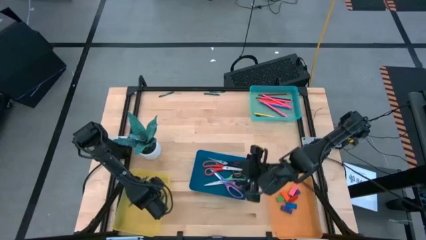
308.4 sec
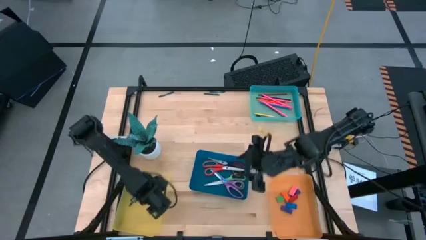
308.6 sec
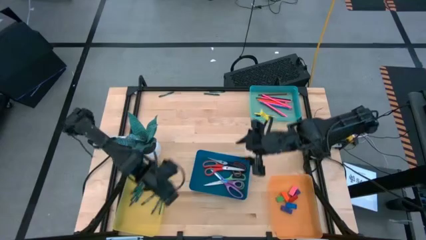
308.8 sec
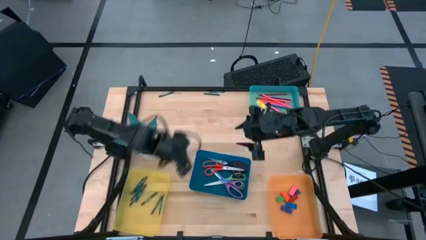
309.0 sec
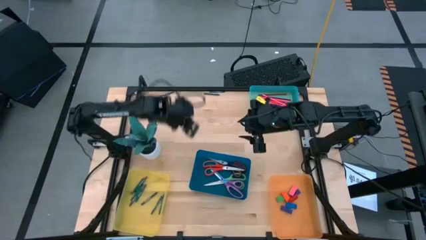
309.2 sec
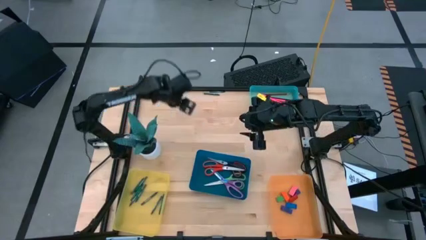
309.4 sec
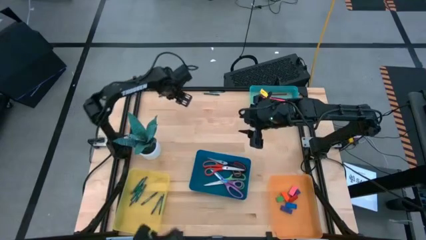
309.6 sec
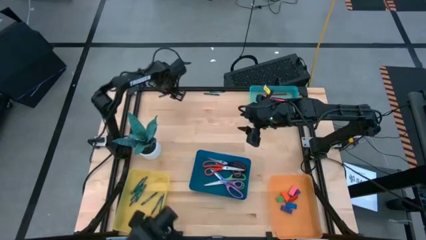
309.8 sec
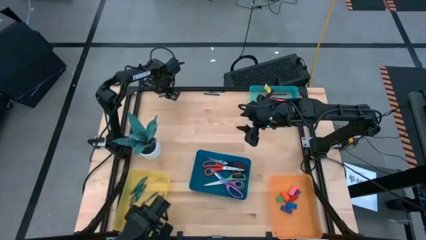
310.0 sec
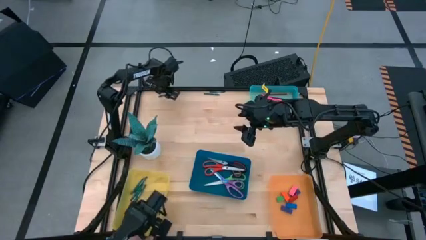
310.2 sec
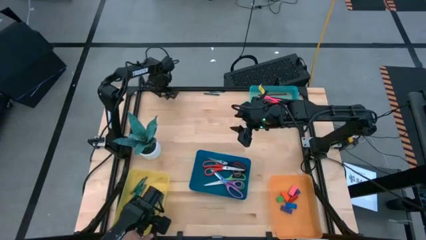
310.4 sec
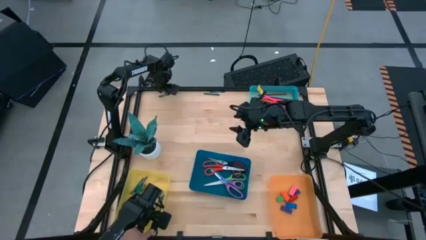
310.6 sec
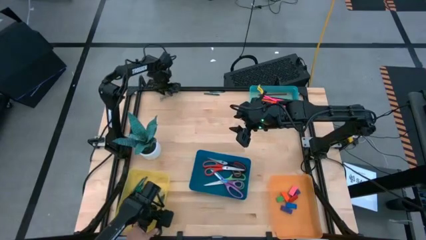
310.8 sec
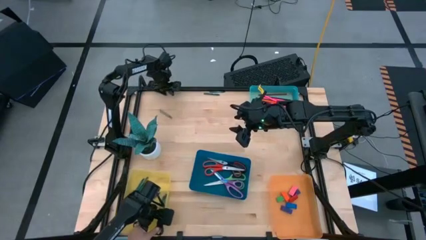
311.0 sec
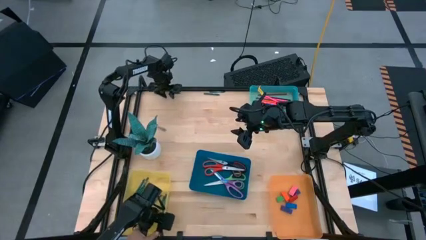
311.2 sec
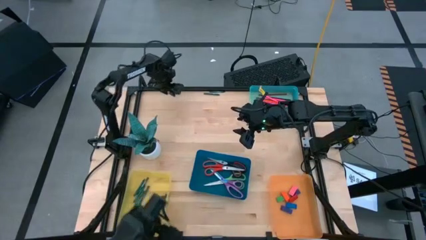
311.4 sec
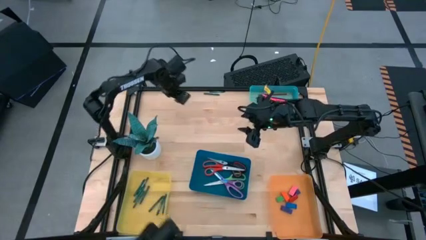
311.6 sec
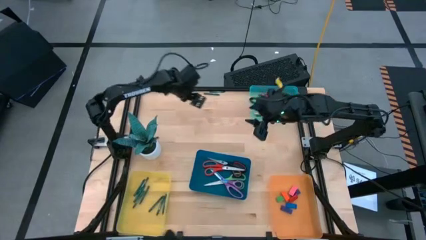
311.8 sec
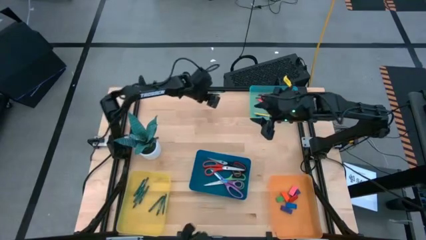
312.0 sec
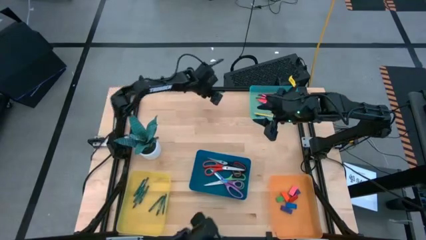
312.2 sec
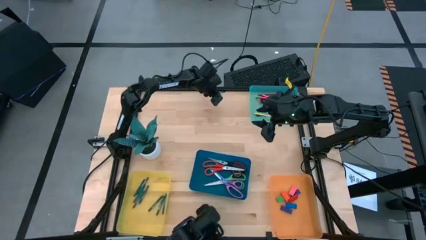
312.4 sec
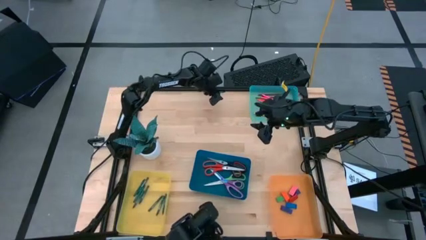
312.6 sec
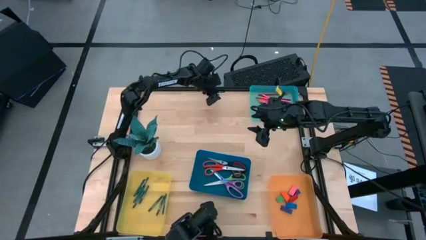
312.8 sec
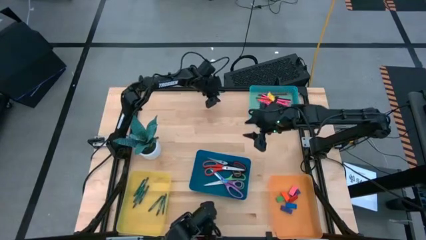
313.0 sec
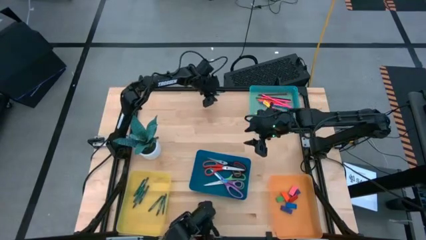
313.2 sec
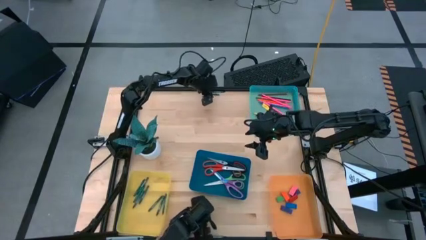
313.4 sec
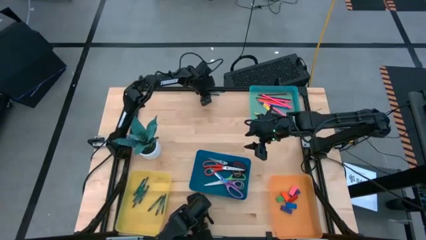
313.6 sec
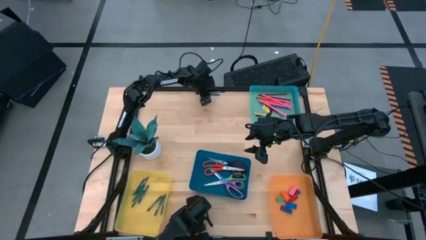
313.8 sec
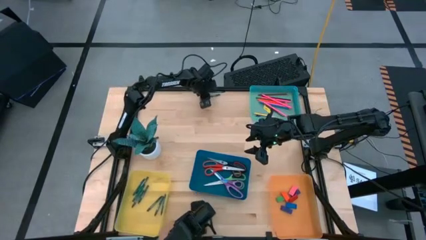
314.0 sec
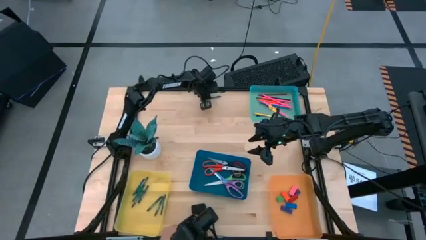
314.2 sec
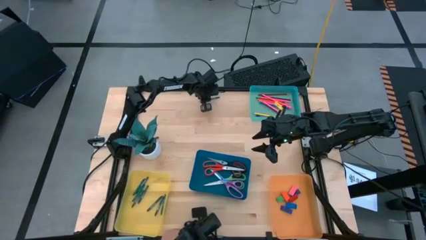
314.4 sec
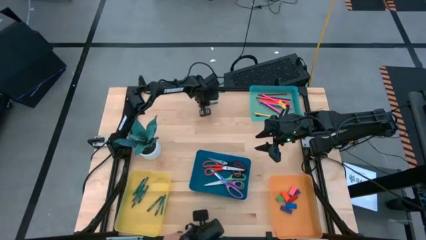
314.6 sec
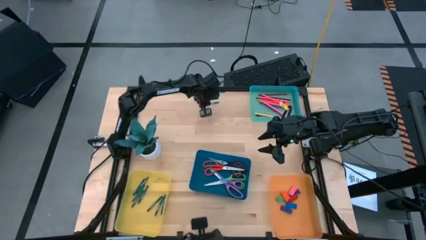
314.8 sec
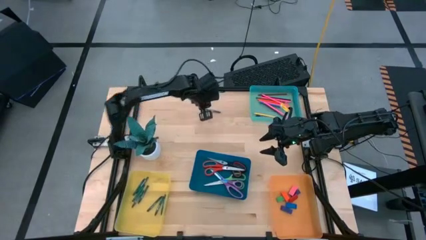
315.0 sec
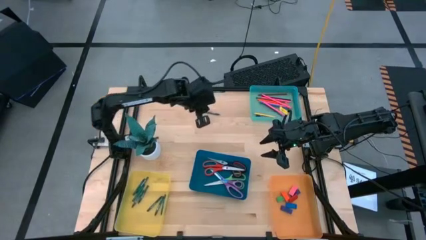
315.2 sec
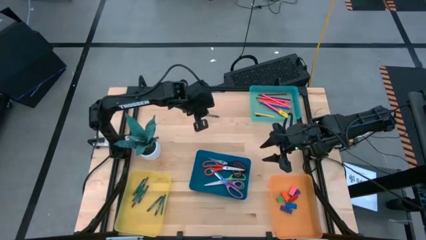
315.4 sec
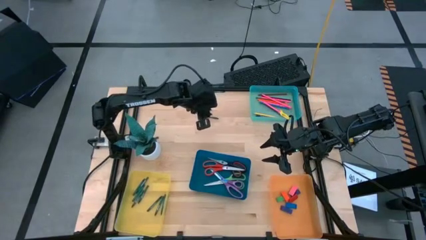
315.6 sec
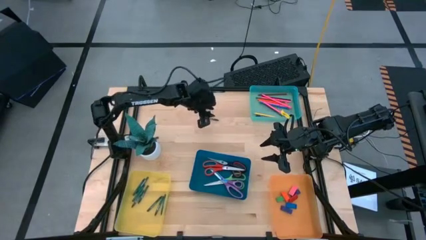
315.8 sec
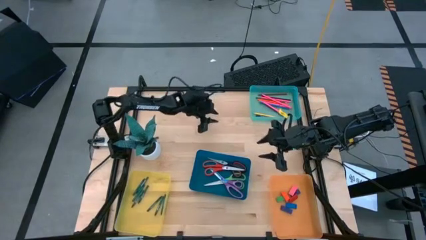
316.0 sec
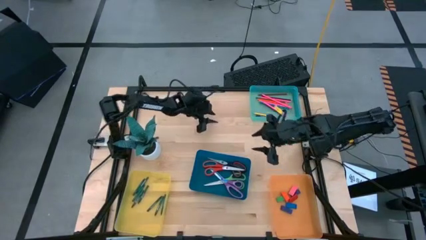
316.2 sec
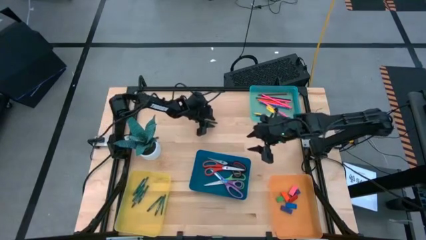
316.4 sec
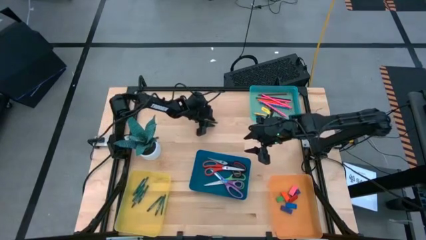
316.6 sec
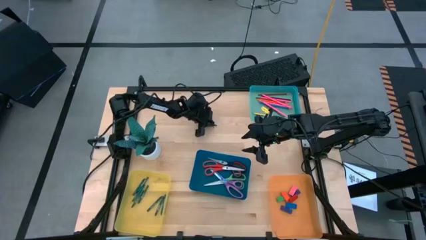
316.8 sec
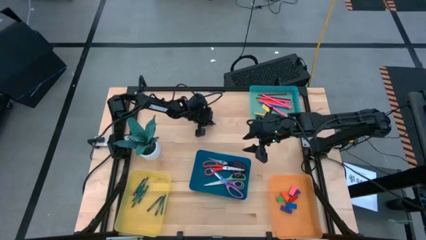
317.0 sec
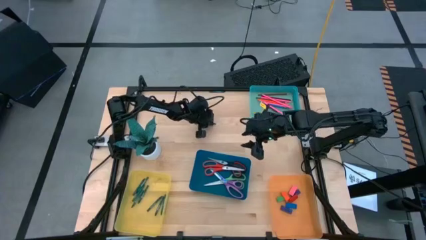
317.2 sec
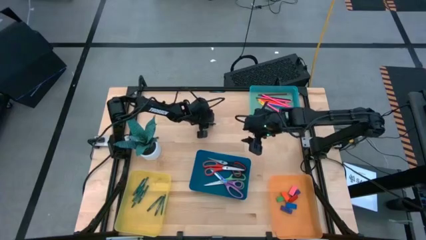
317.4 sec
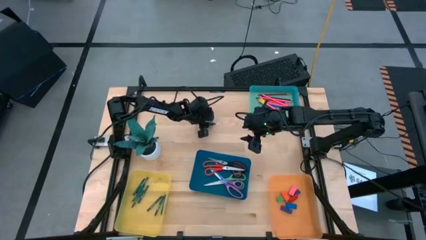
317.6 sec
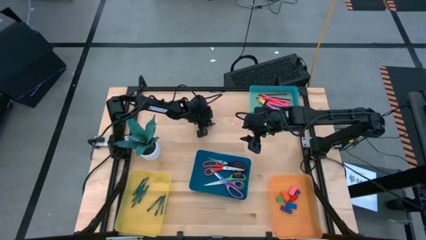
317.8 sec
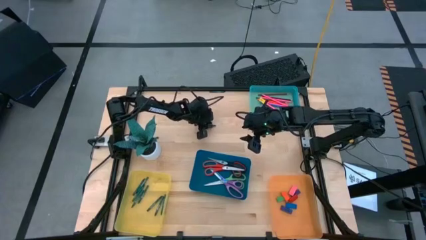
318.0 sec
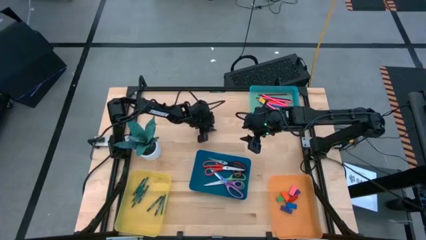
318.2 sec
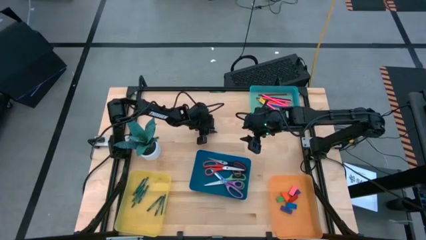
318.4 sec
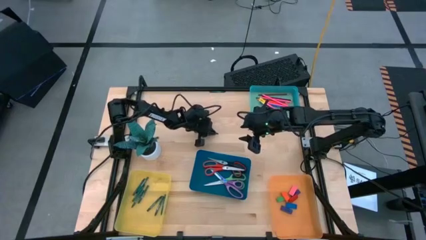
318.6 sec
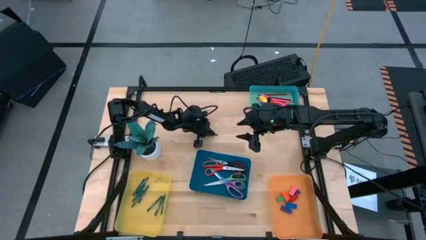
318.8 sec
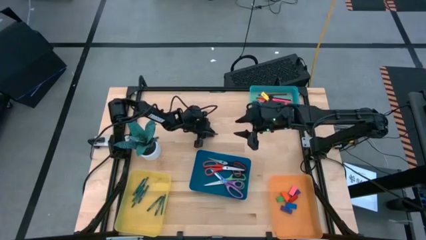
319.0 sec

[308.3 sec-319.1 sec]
Task: Sort crayons/erasers/pens/pencils in bins
Put the green crayon into the yellow bin

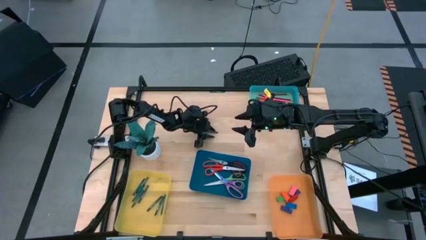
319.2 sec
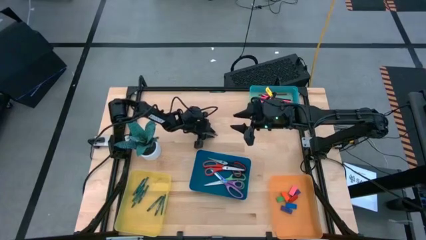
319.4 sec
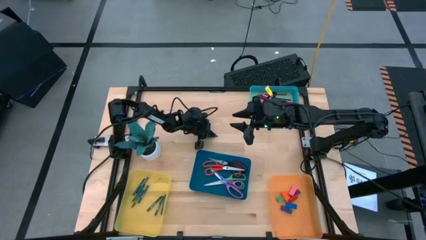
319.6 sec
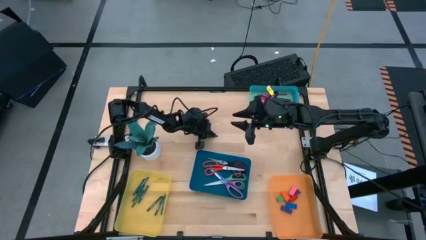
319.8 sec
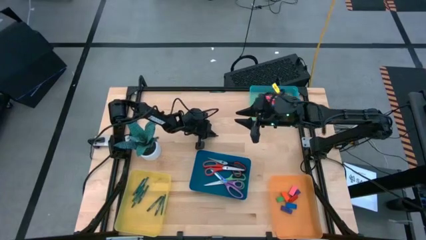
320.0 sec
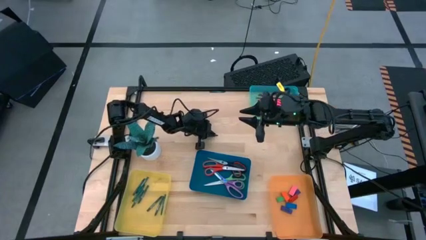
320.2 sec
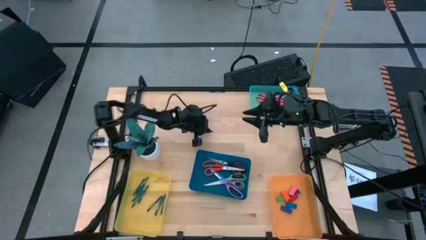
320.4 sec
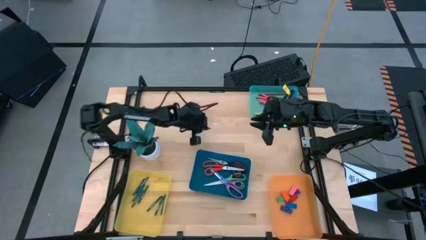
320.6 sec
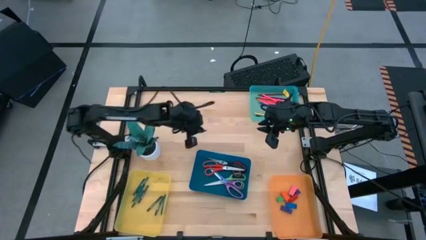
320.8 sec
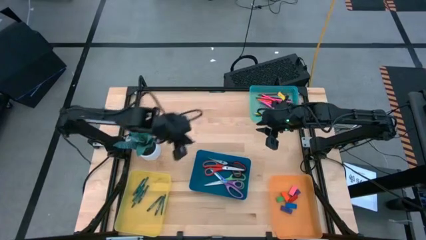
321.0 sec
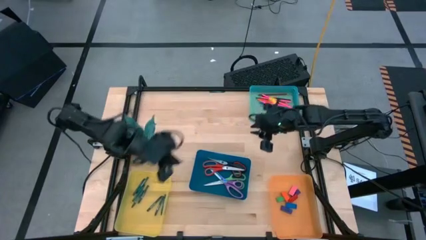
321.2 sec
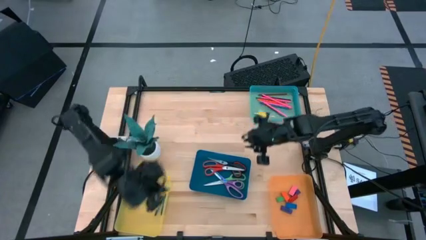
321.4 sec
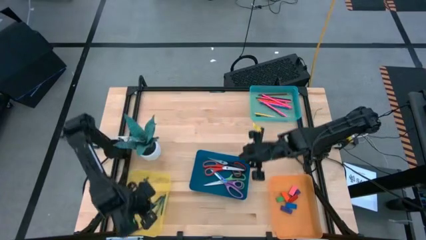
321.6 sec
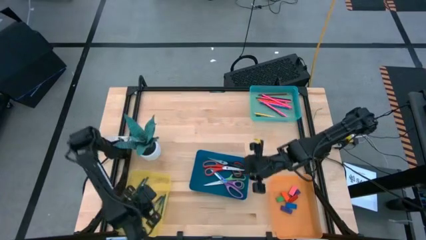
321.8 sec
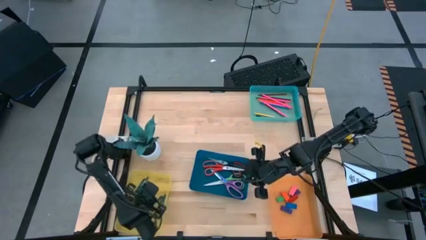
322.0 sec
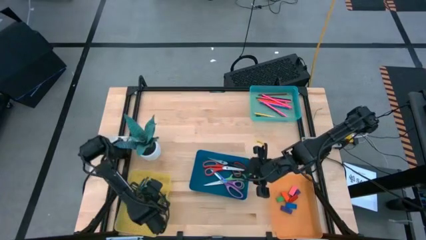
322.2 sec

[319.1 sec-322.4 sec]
Put the green crayon into the yellow bin

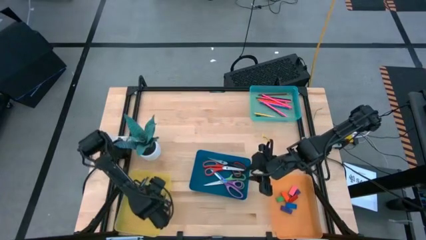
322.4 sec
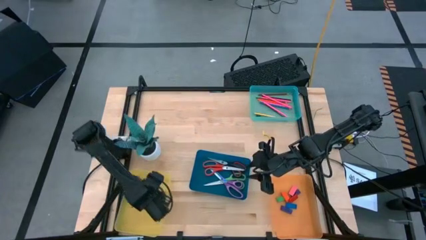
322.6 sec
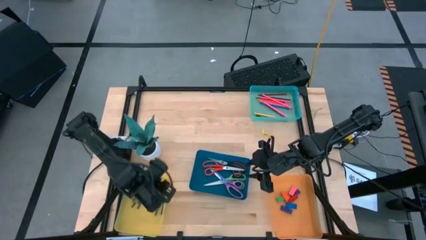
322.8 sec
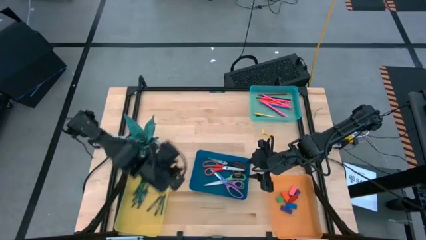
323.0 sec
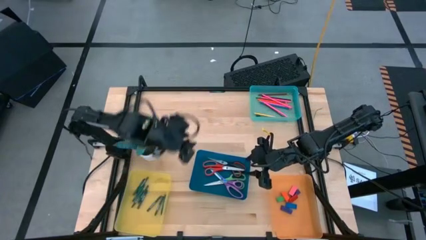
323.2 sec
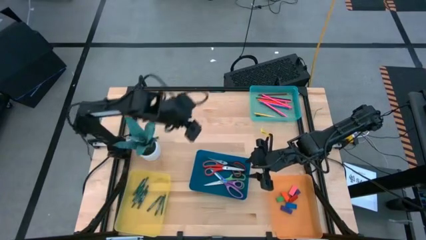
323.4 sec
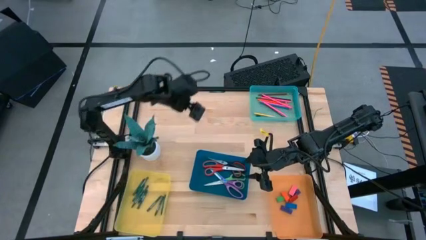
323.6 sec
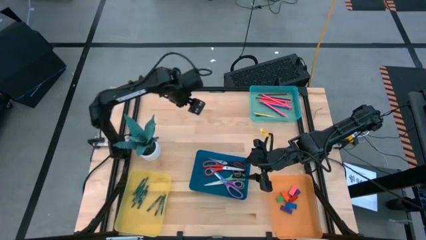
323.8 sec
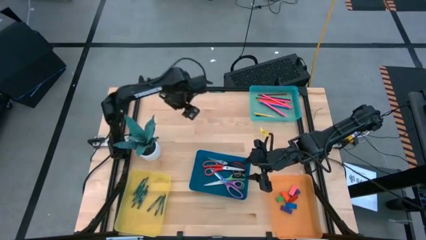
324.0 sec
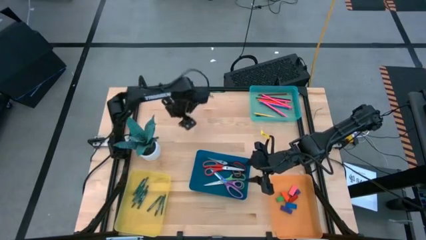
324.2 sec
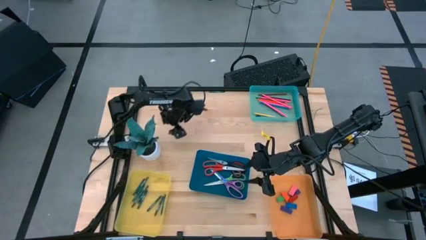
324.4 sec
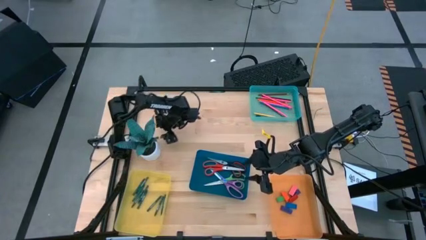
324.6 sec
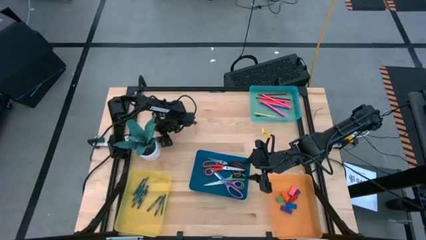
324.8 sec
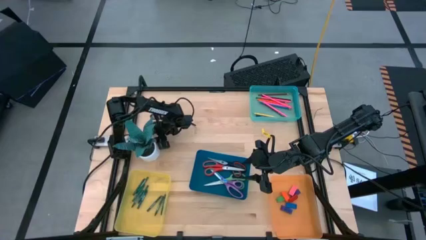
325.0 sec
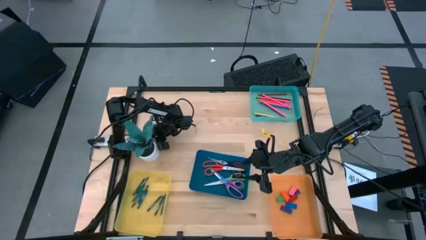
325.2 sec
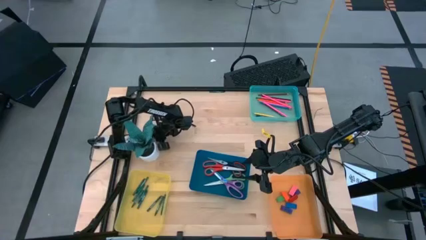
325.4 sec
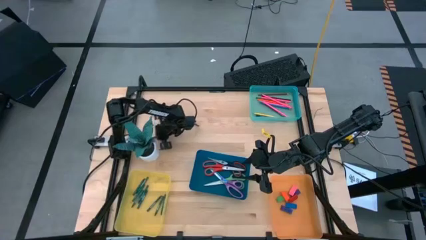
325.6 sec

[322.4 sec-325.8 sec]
Put the green crayon into the yellow bin
